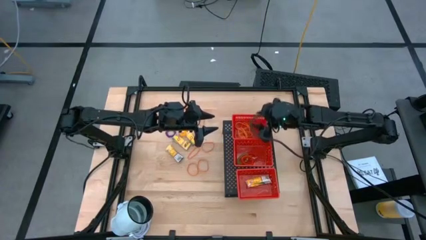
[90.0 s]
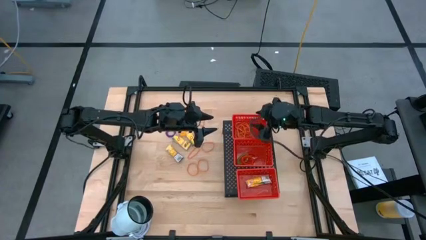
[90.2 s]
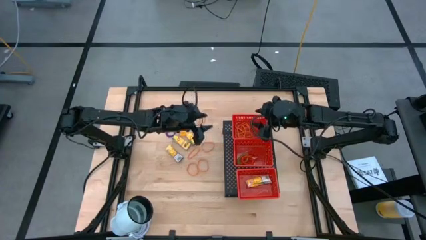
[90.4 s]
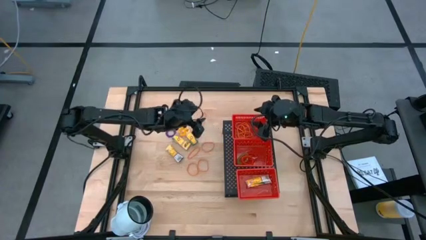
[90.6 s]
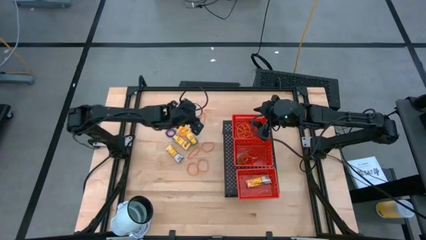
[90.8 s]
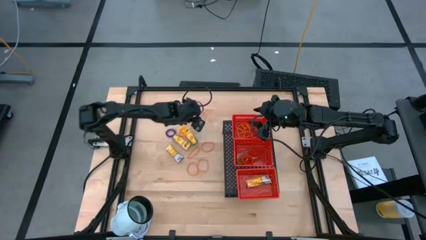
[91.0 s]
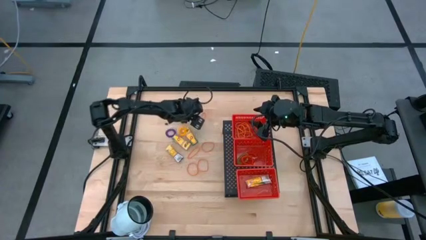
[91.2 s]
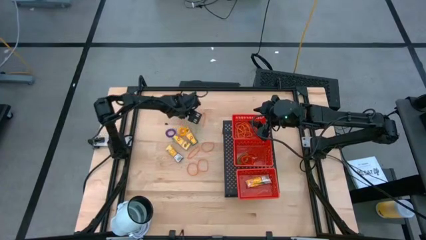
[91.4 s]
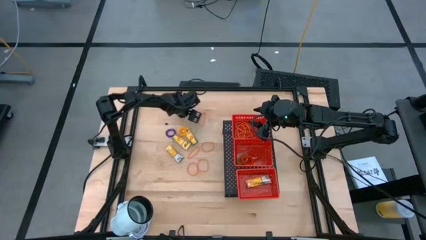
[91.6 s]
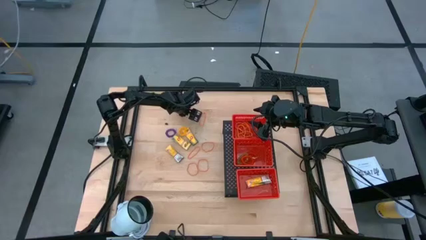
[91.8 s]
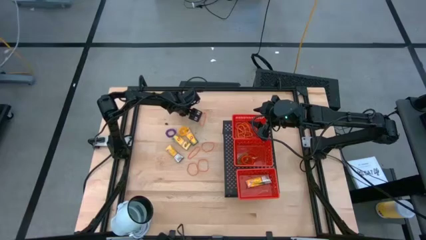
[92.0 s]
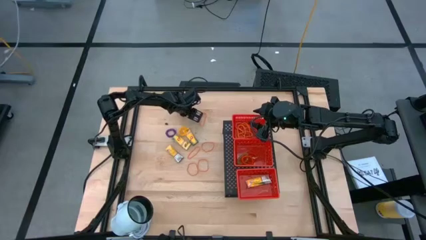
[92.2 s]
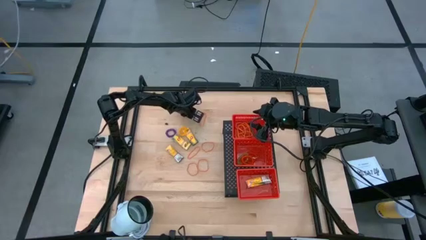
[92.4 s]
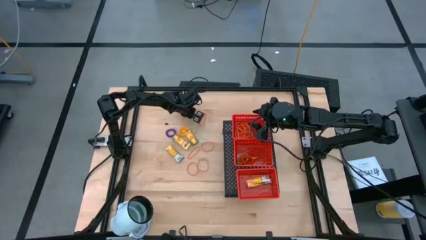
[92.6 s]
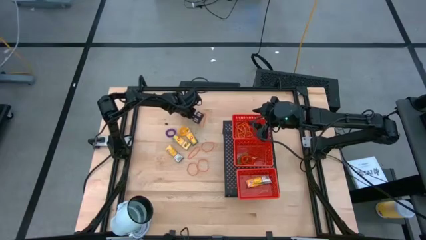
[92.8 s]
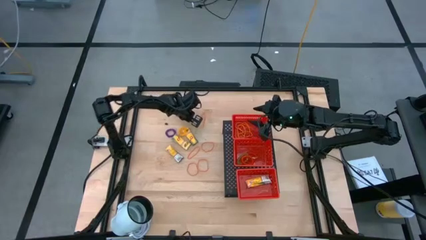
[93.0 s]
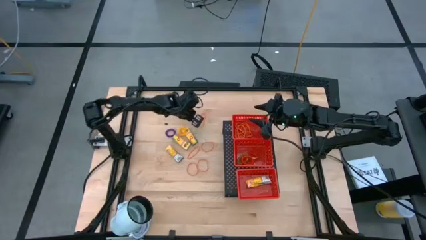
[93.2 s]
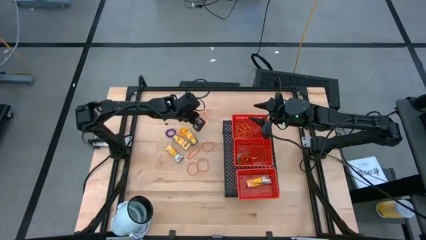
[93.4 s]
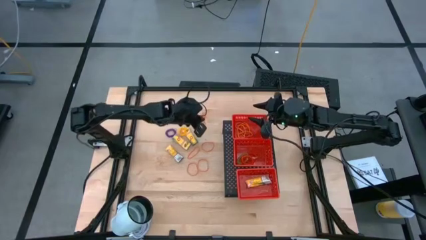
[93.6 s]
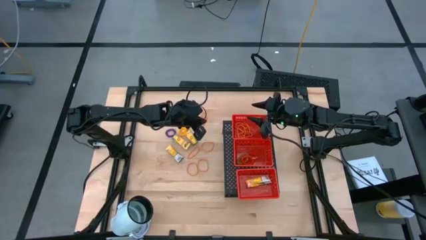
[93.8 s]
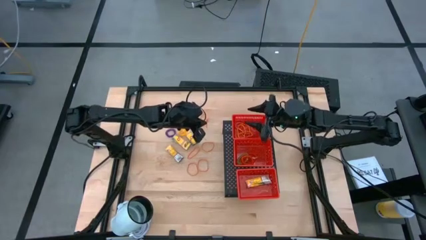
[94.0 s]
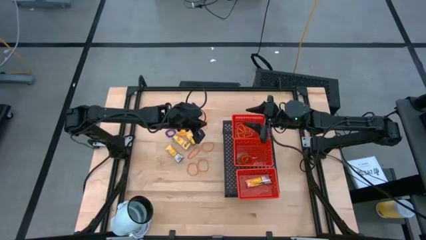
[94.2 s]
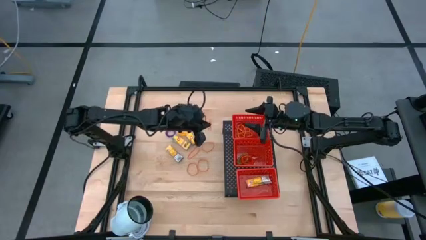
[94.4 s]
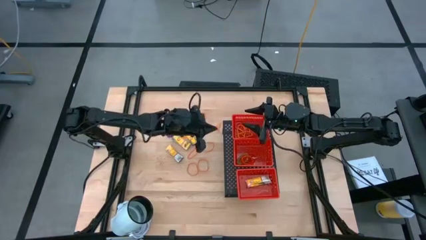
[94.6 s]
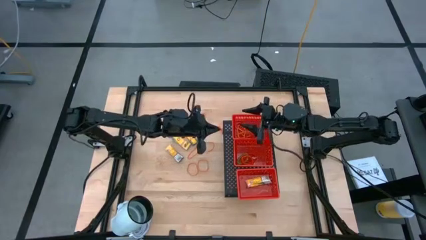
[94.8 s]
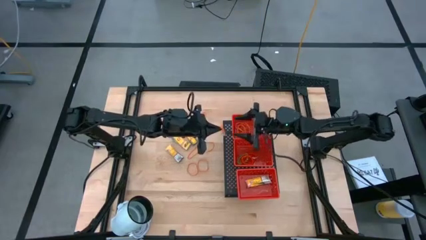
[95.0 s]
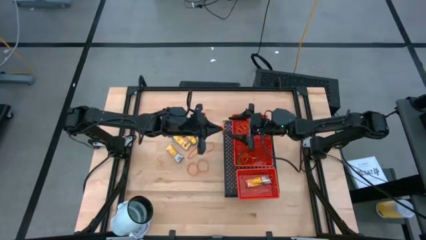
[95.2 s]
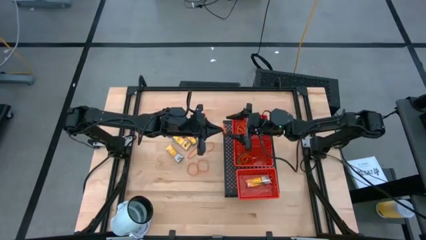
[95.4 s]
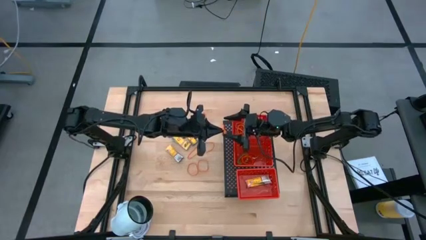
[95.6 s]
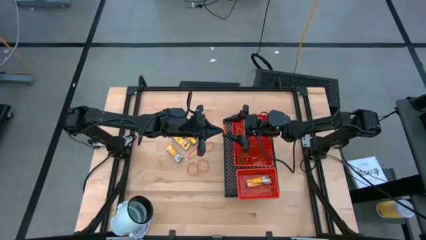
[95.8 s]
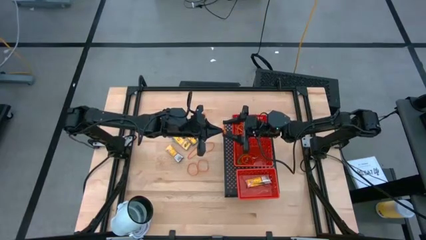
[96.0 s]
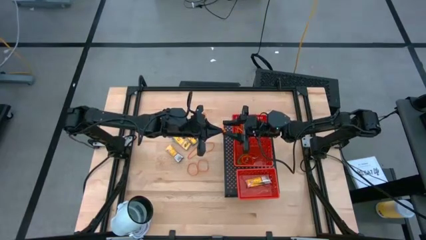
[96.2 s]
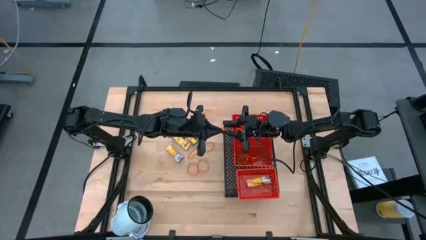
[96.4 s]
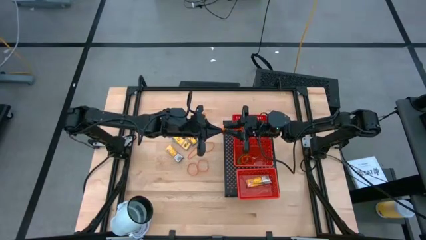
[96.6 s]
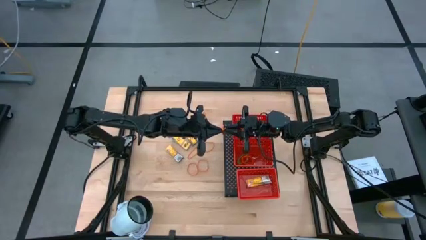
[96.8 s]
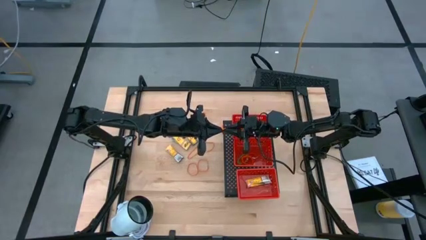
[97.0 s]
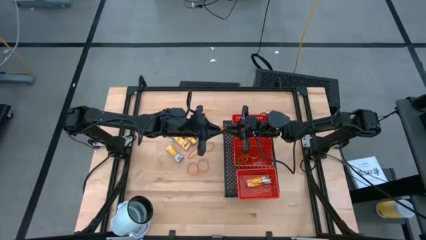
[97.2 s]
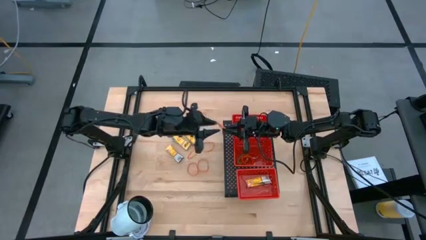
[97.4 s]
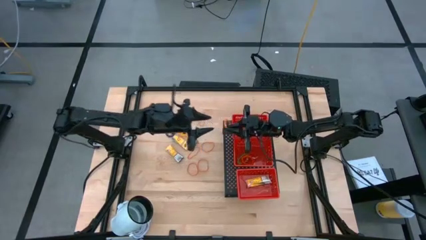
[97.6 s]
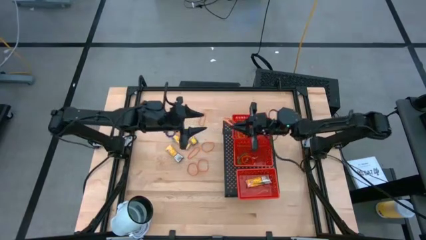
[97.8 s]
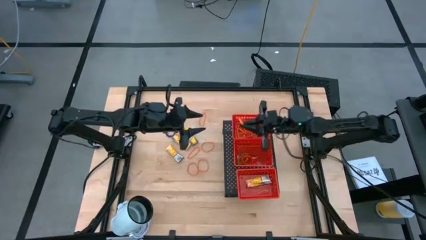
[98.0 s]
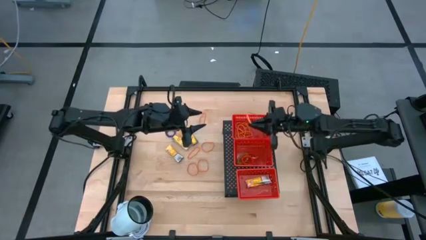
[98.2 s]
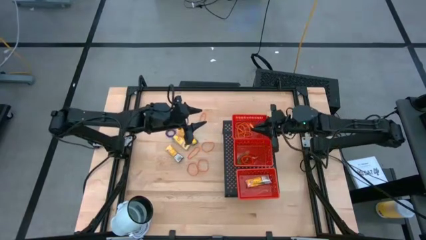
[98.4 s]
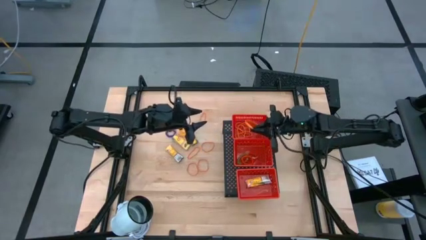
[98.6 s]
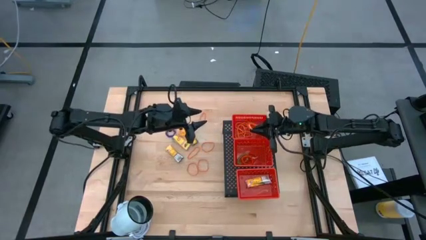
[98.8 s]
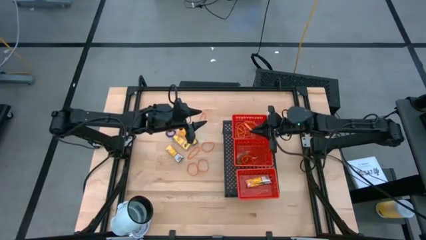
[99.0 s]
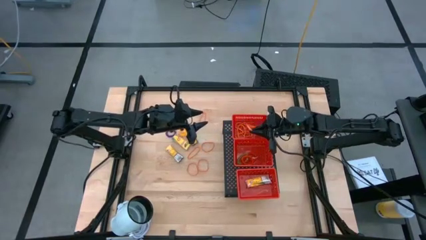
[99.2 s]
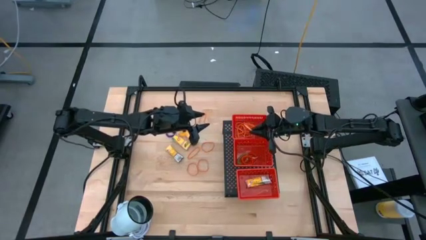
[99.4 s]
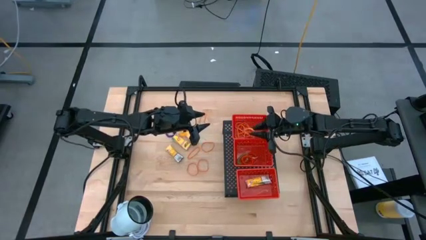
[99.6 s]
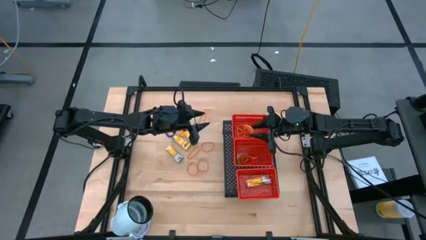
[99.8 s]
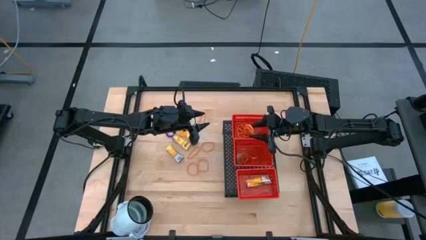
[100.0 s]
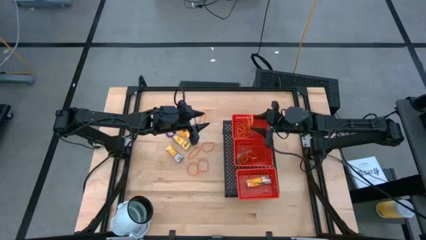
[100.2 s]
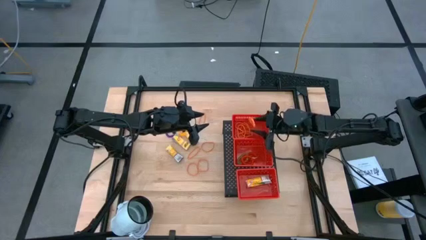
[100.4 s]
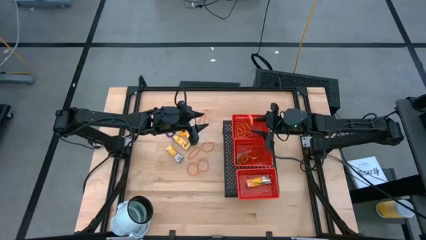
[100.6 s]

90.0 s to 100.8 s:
Task: Pick & Place Office Desk Supplies
Put the orange rubber band into the top red bin on the shelf

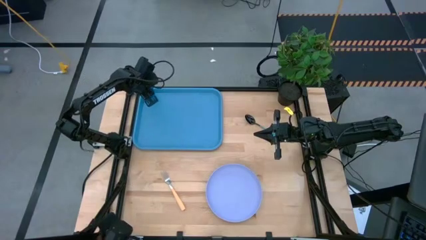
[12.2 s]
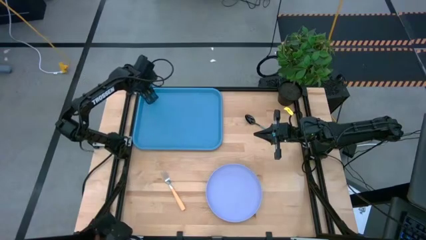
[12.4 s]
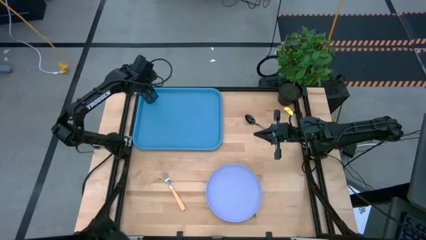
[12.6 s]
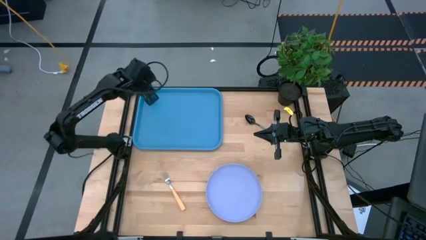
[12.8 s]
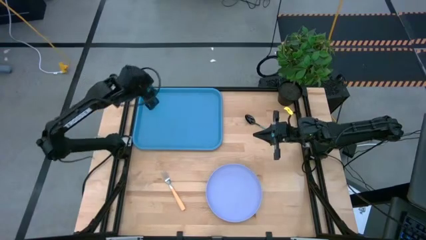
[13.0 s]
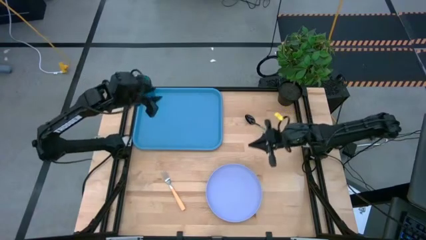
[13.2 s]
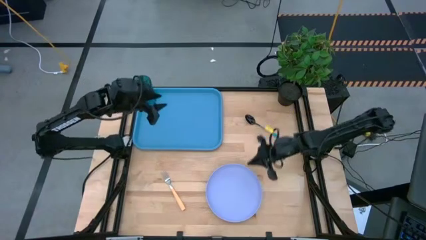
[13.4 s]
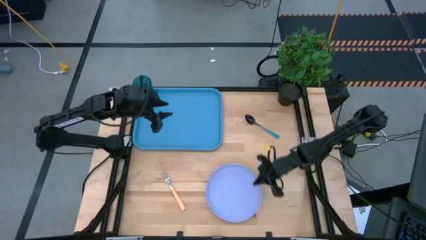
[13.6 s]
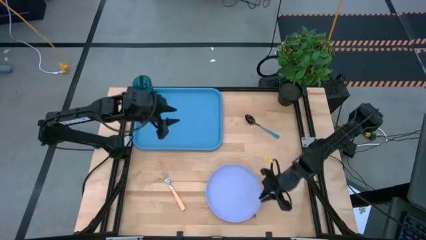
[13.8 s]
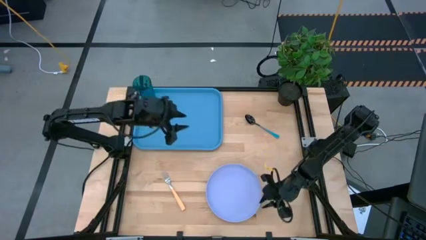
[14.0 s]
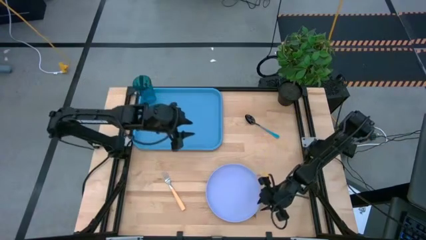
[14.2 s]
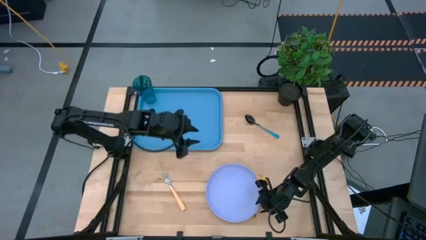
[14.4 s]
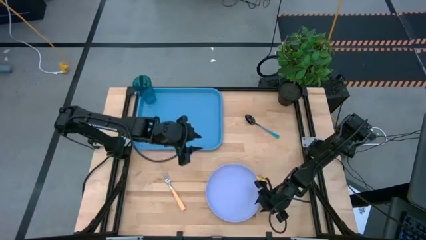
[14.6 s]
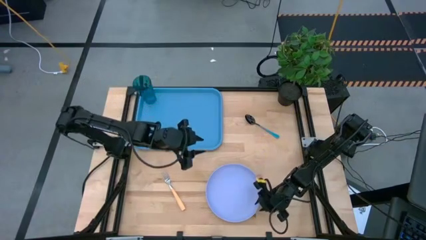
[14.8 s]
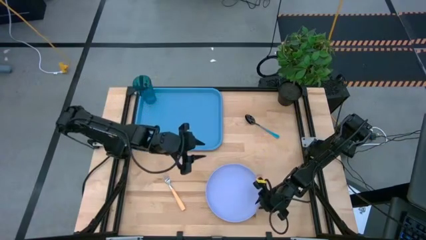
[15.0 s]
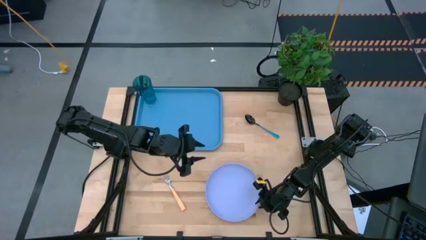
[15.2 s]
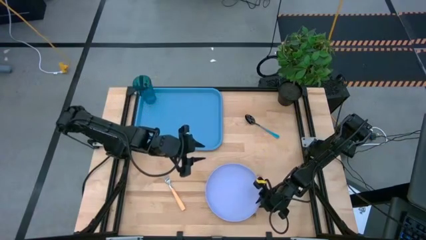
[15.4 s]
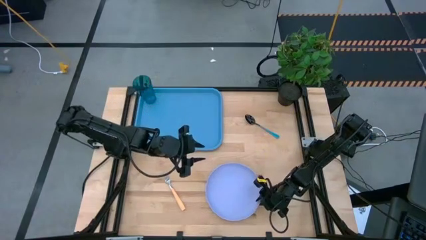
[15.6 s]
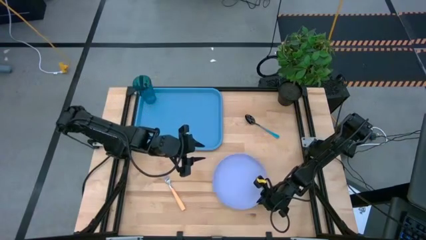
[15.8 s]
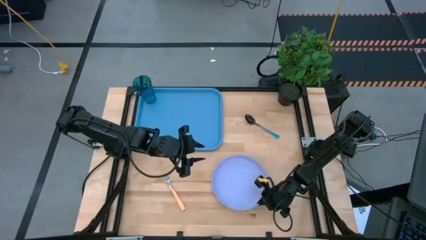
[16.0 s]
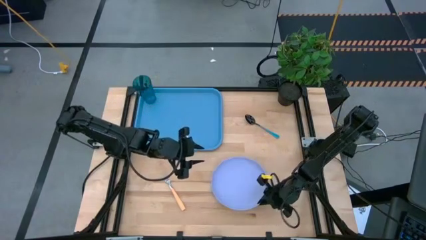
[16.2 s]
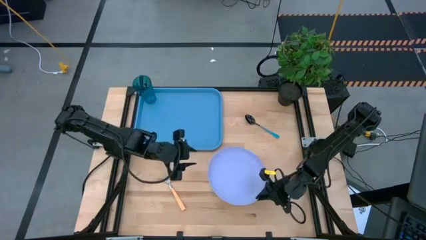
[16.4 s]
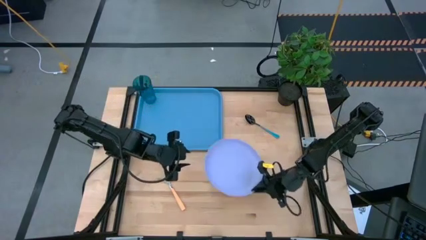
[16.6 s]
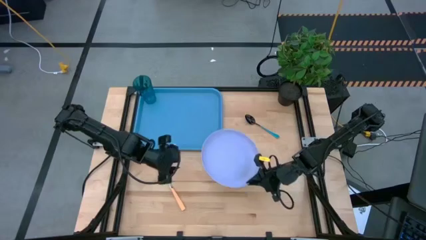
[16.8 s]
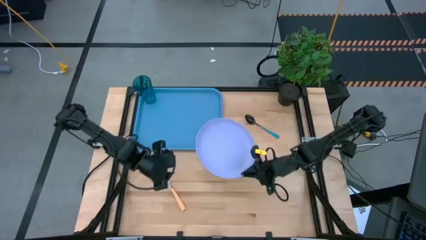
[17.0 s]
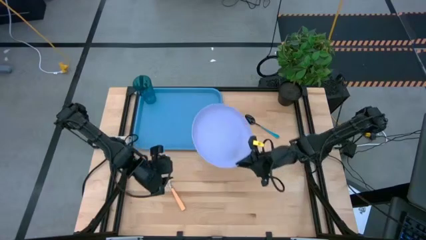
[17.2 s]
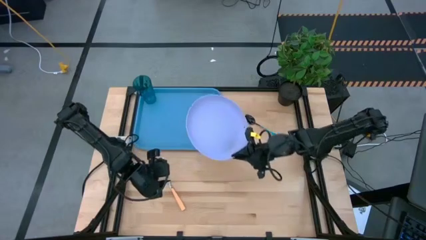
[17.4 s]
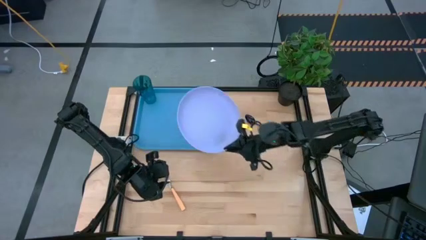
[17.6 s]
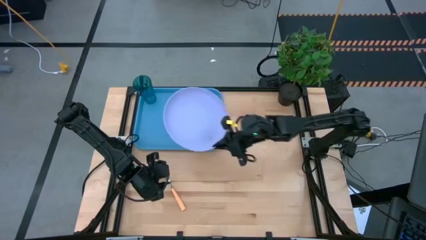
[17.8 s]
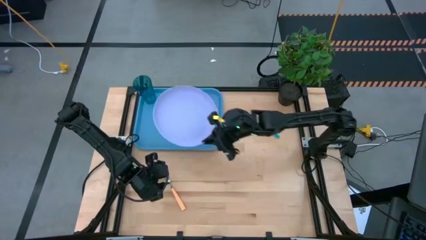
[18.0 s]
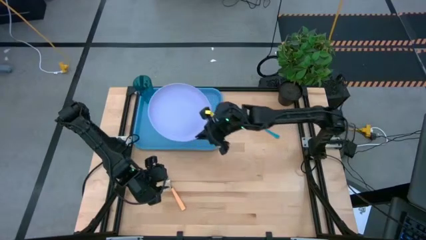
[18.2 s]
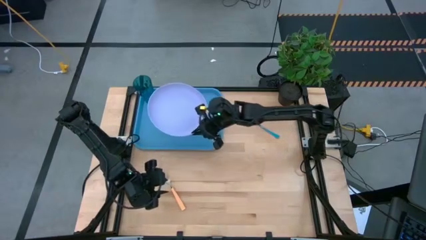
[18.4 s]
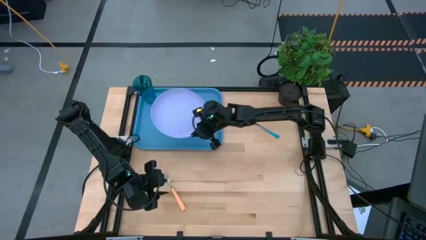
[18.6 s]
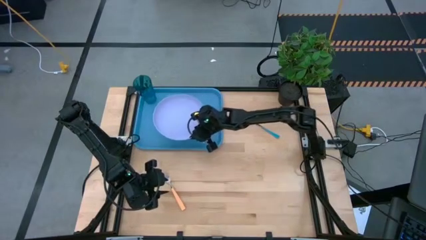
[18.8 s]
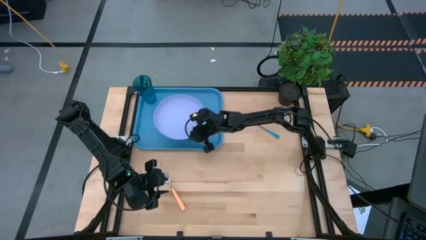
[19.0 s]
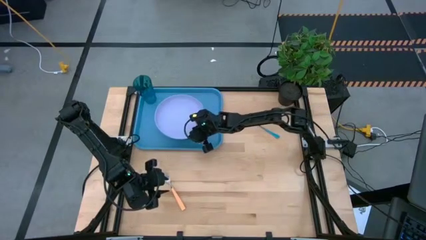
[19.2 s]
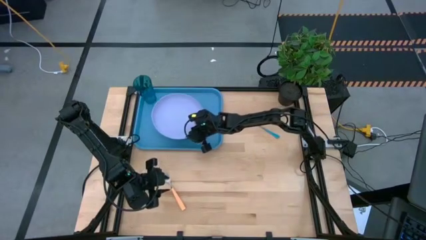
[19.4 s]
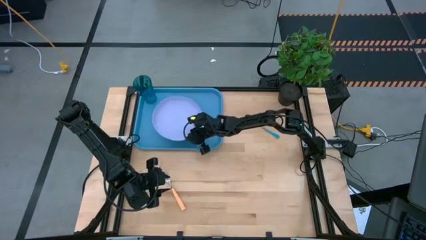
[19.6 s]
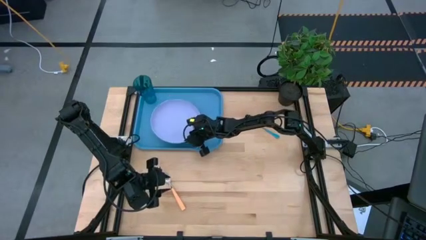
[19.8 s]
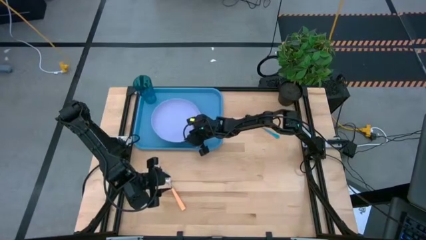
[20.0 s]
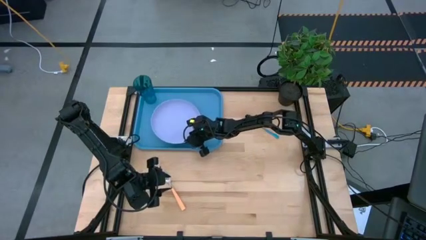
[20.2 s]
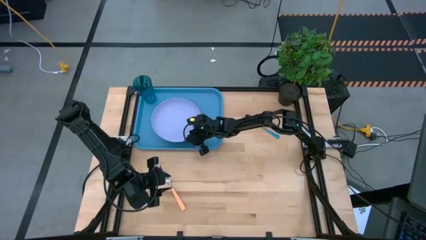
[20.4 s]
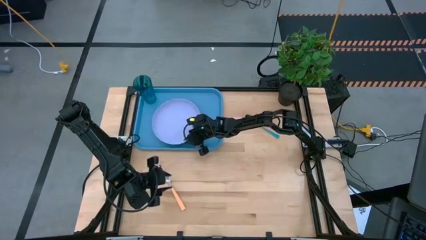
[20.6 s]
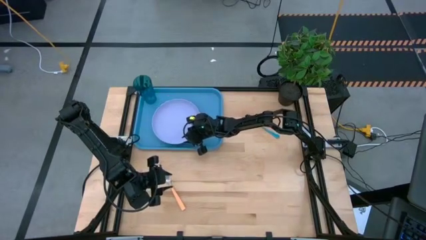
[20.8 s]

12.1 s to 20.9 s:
Task: Pick and place plate/cup/fork/spoon on tray
Put the violet plate on the blue tray to the bottom of the blue glass cup
